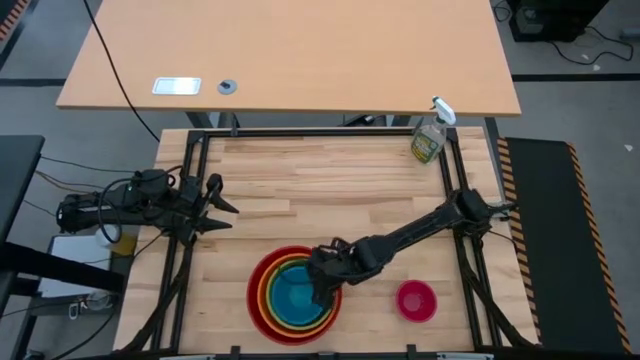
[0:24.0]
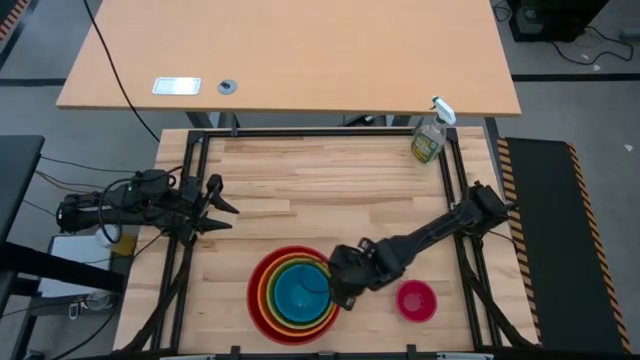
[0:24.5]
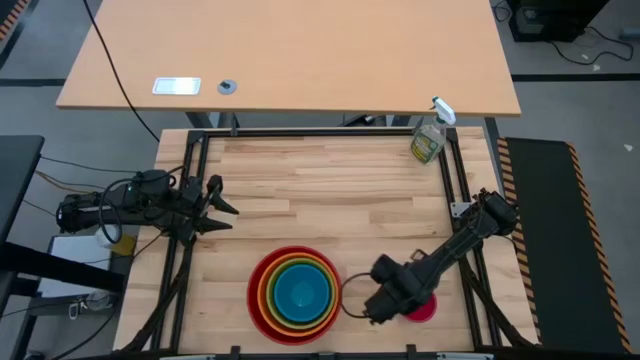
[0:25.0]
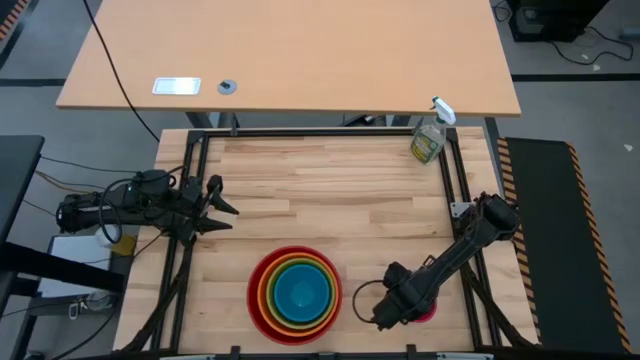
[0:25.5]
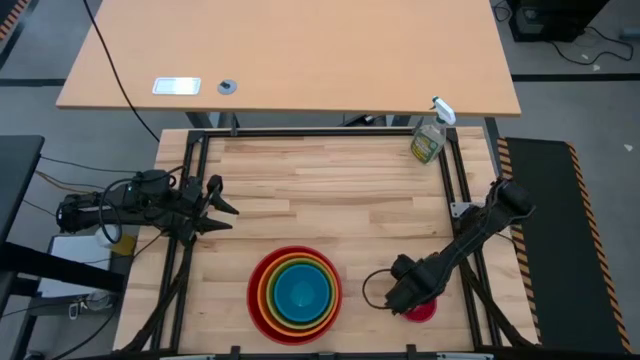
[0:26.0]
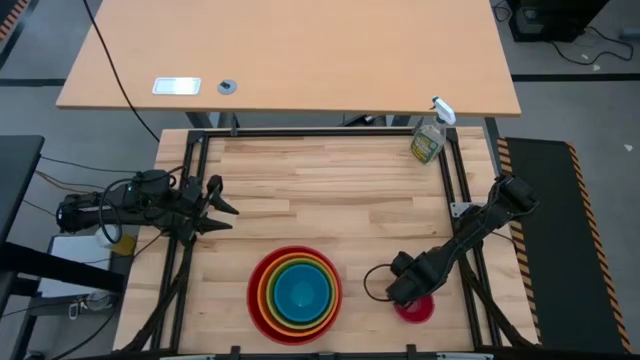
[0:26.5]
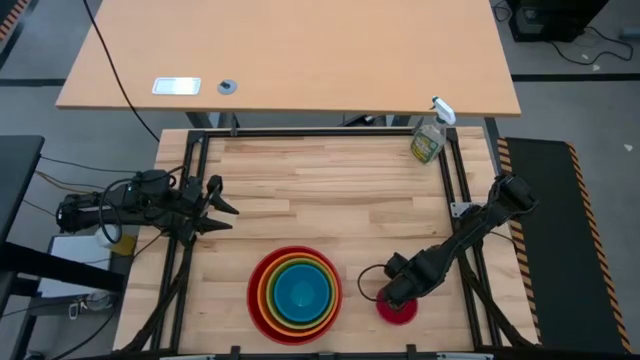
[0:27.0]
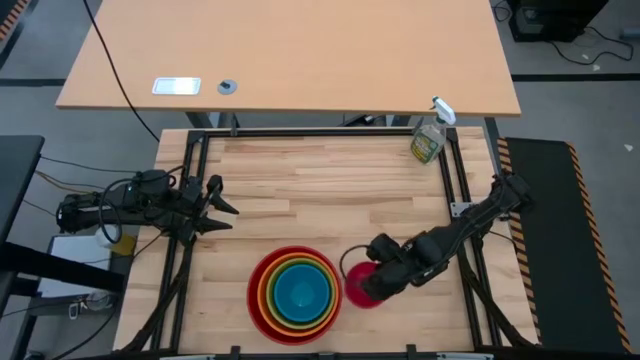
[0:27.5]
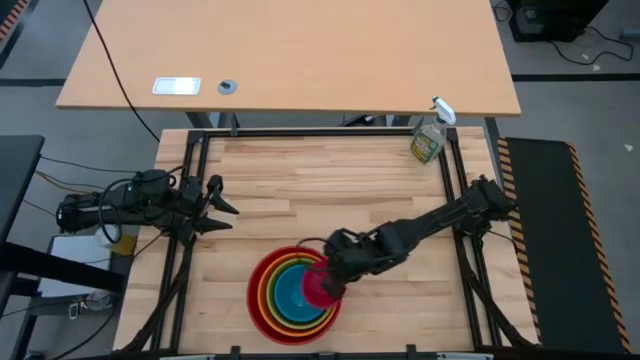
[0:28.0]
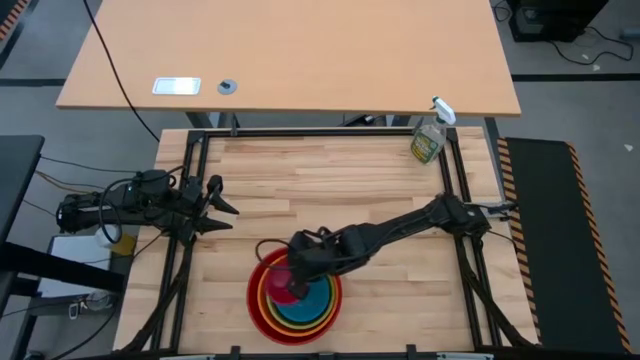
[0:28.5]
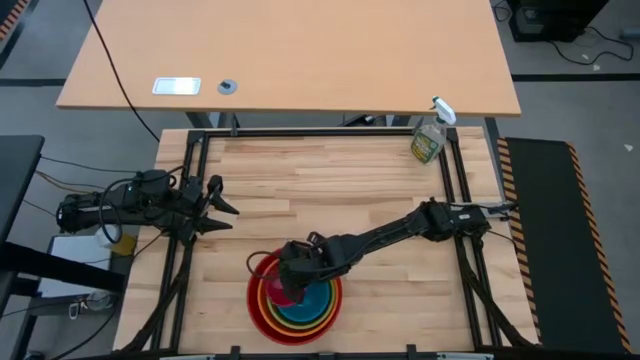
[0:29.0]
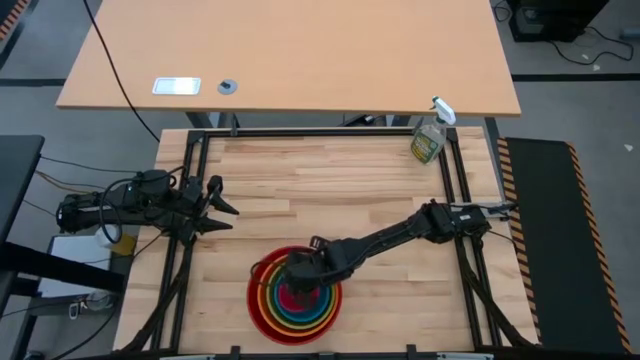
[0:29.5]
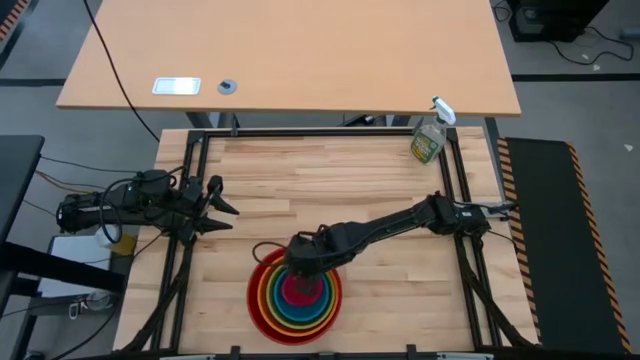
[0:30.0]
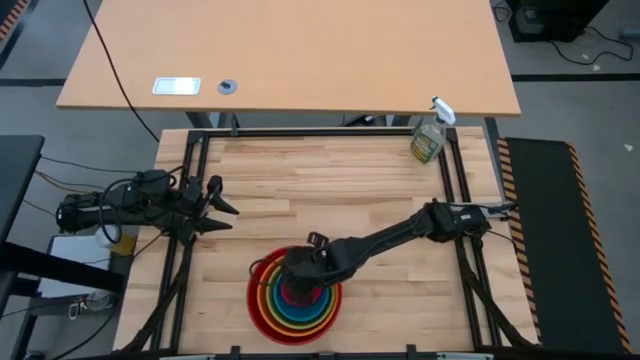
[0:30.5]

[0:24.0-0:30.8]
Stack the red bowl on top of the blue bowl

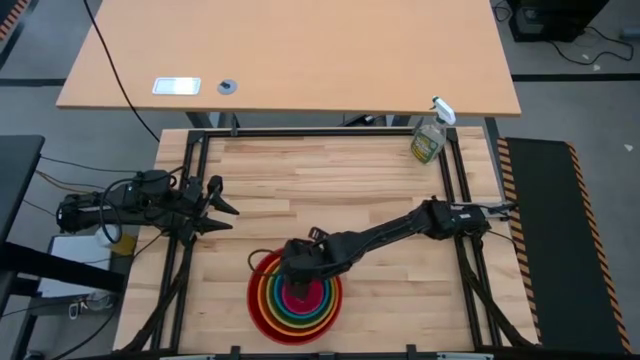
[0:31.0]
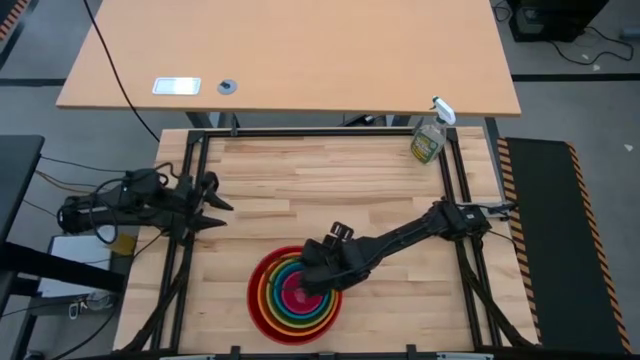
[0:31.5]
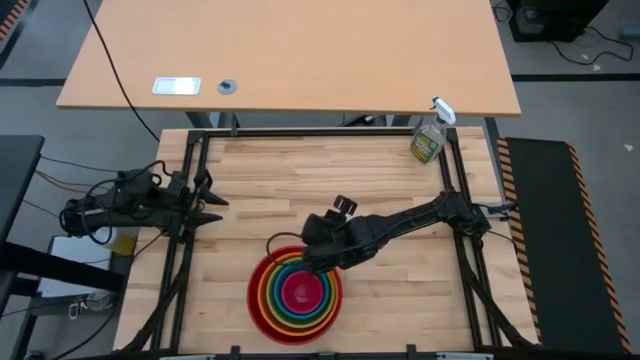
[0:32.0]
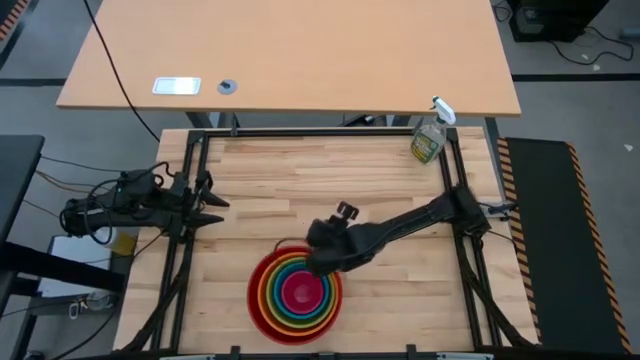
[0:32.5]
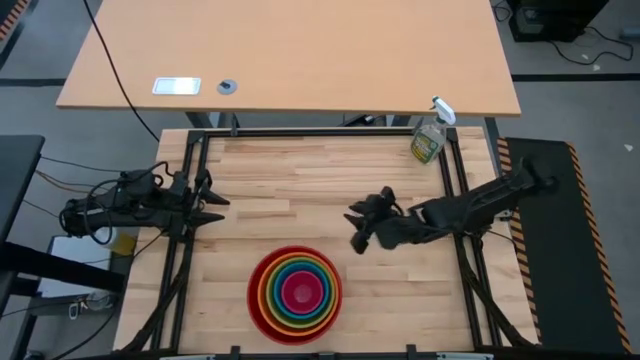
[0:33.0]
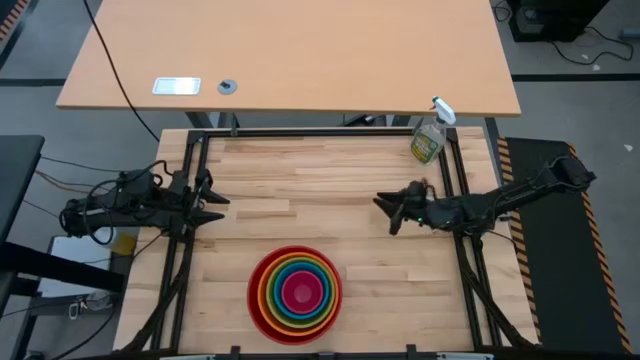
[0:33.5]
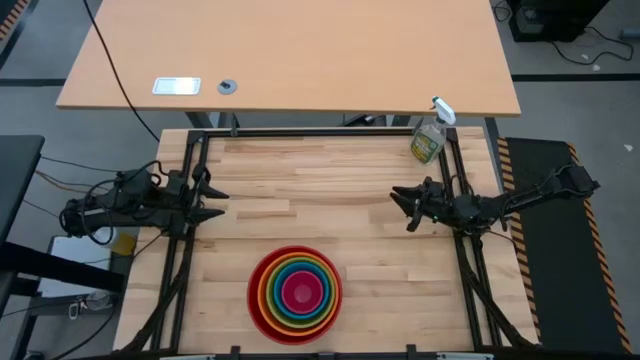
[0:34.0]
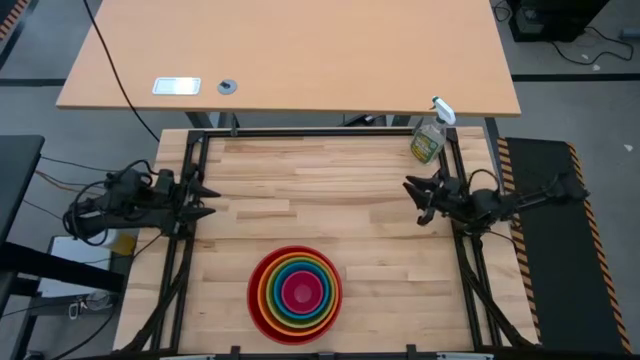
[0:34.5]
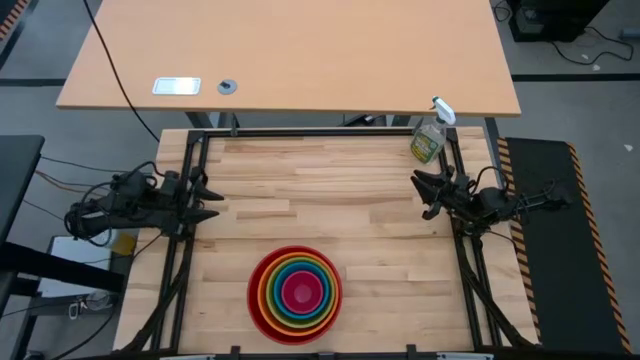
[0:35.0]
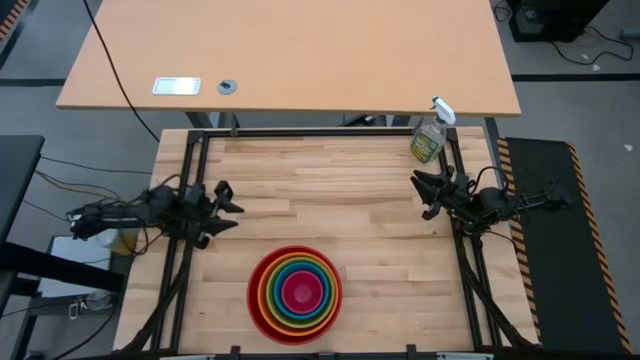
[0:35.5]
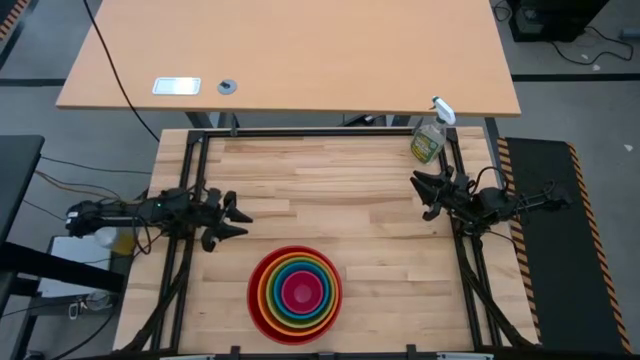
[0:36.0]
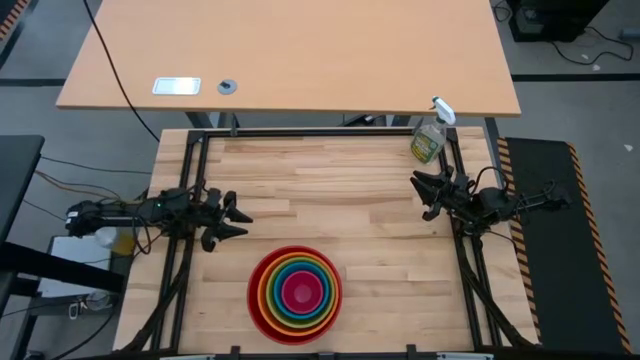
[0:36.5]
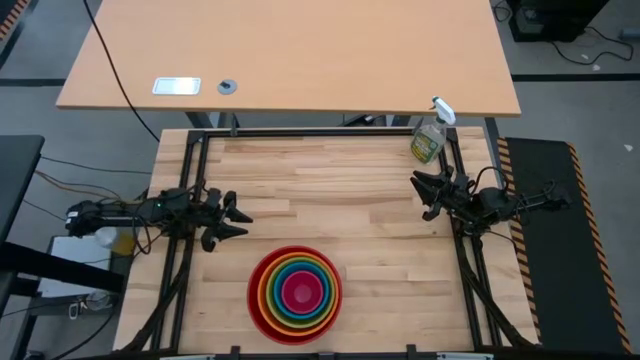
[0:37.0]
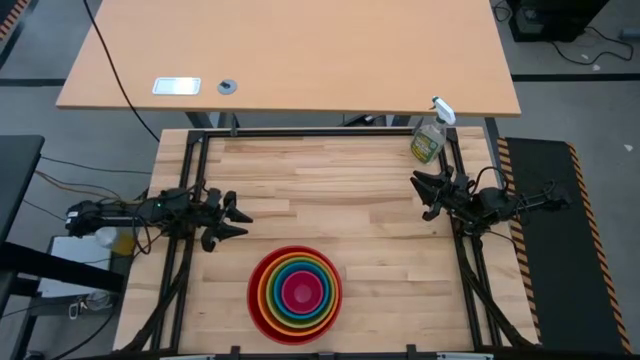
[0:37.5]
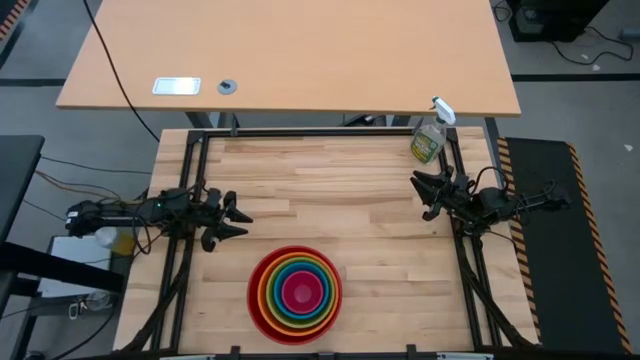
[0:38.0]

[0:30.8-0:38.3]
Return to Home Position

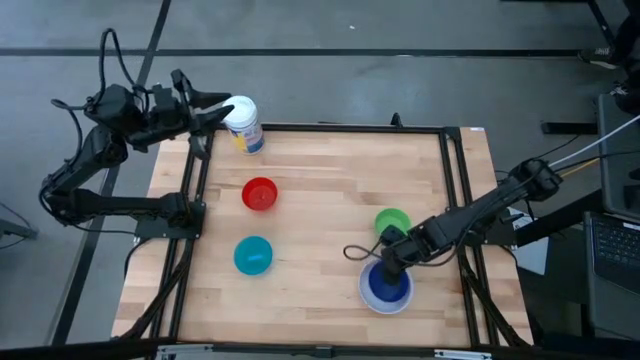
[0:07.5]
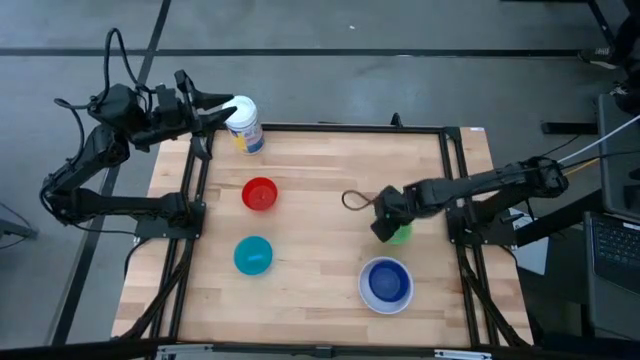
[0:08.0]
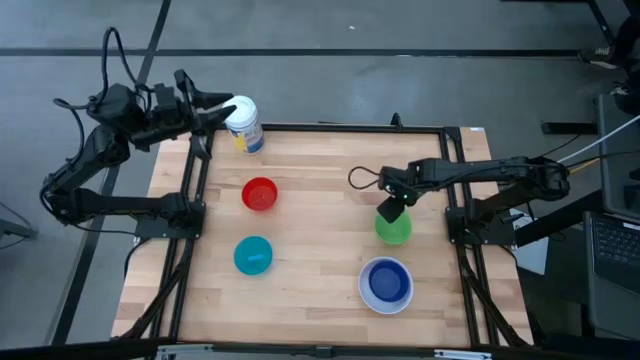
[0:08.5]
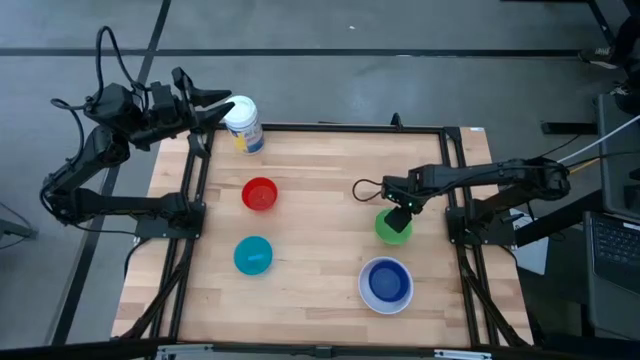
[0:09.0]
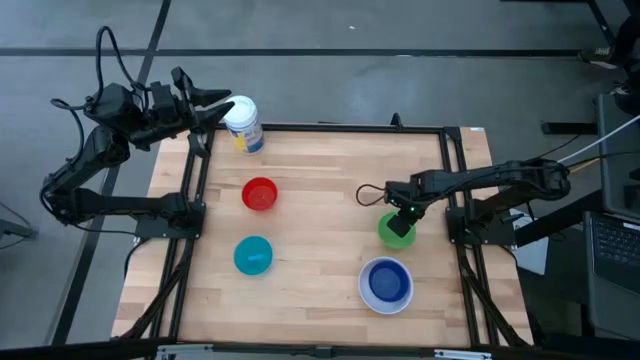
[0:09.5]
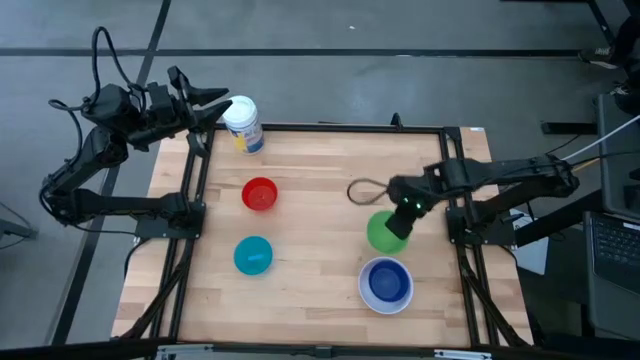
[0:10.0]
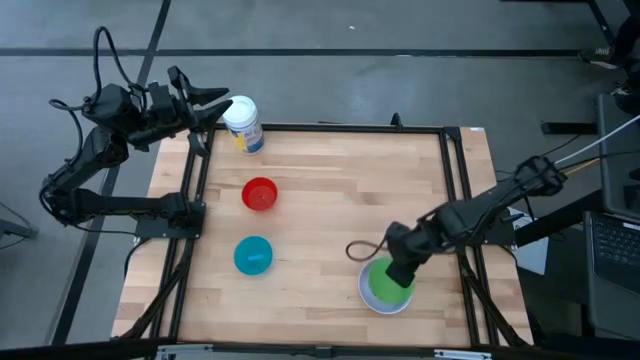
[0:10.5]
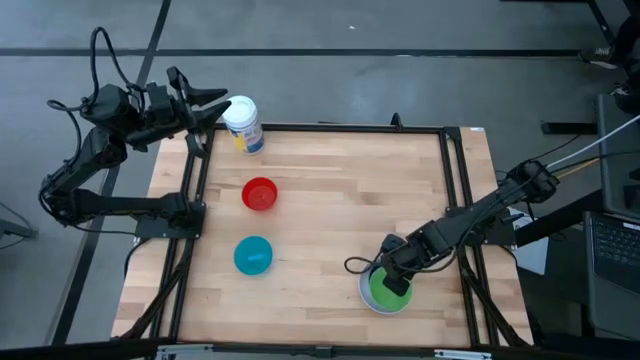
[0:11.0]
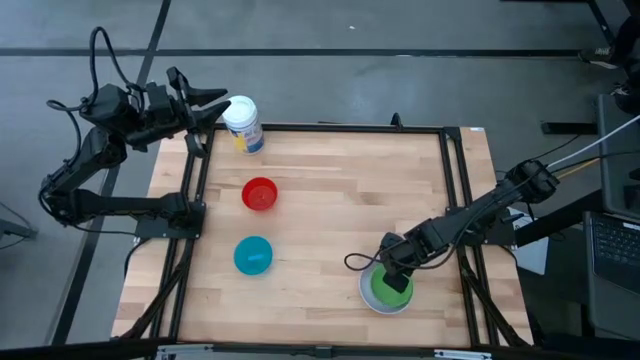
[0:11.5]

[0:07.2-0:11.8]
Stack the green bowl on top of the dark blue bowl

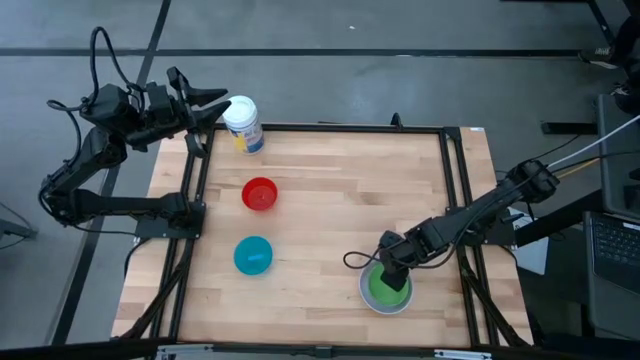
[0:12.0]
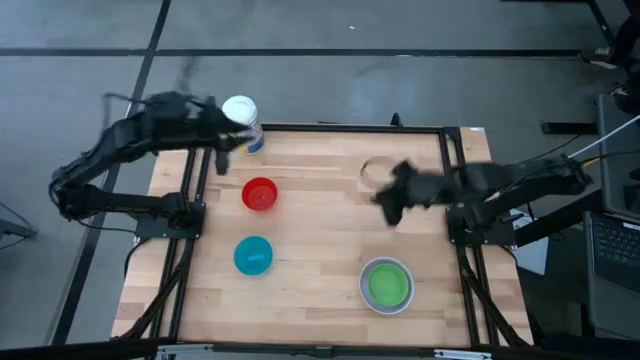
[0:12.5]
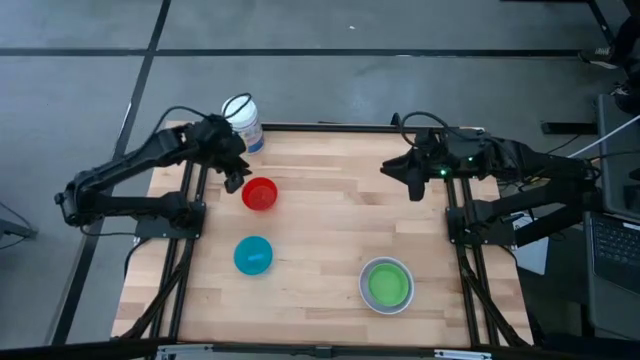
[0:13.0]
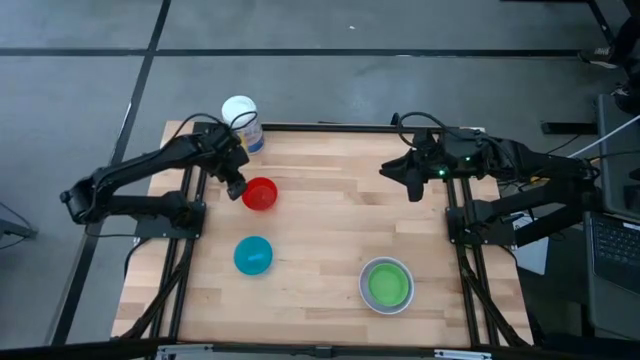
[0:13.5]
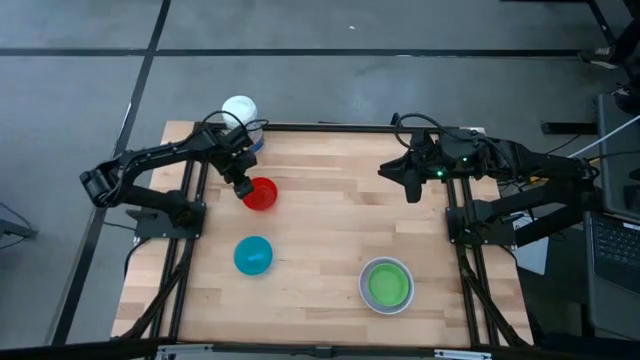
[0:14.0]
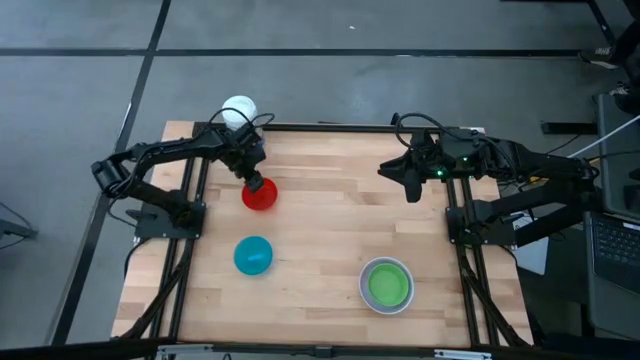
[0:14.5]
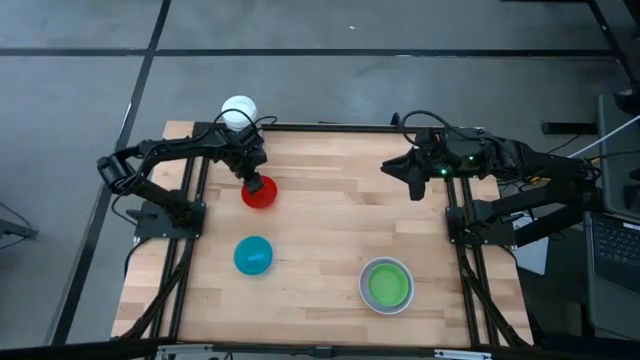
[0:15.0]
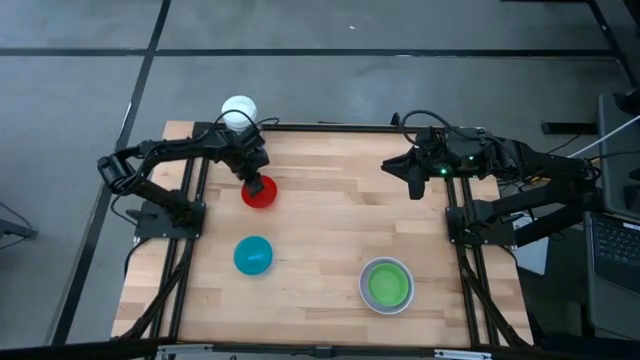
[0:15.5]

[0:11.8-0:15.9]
Stack the red bowl on top of the green bowl
